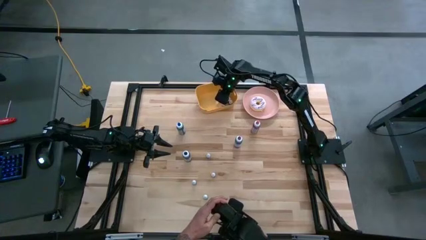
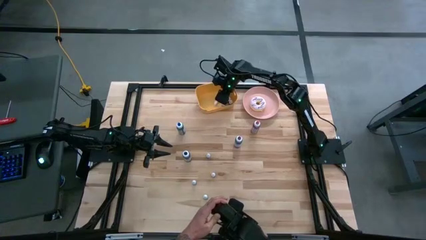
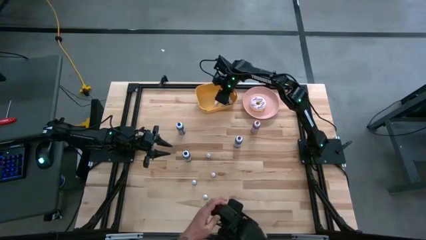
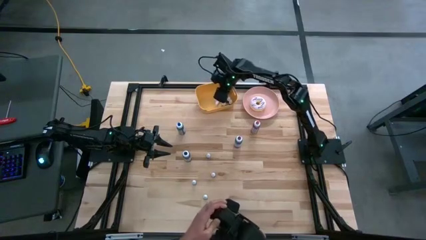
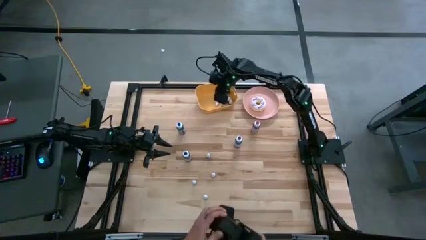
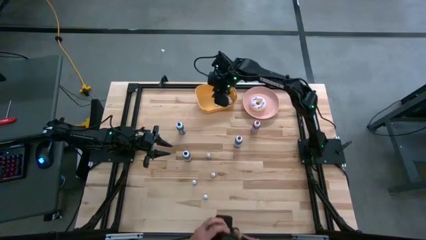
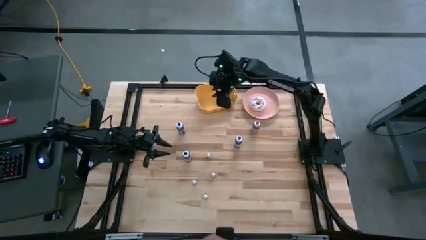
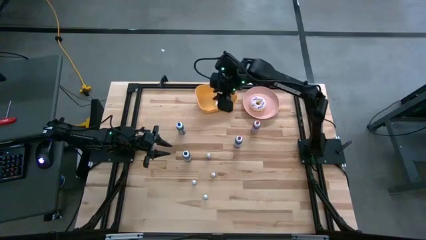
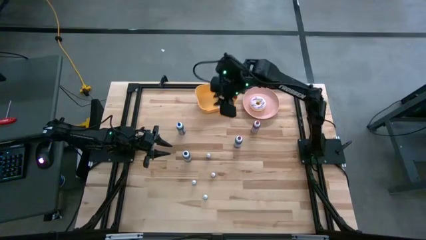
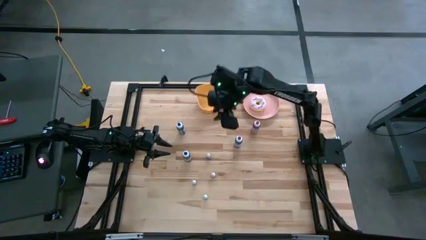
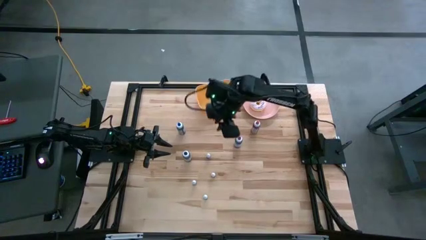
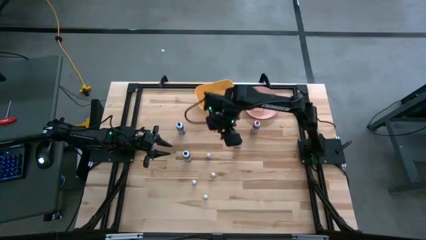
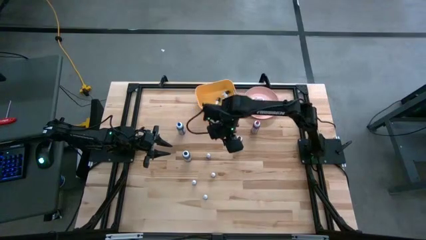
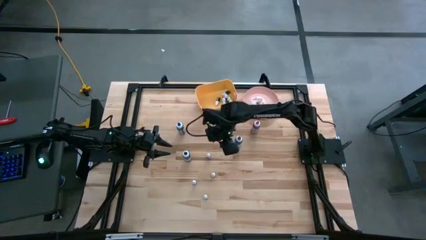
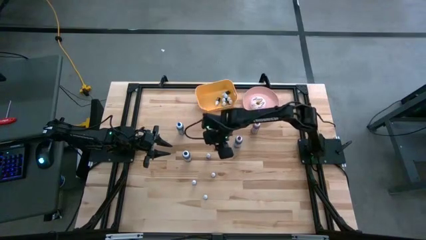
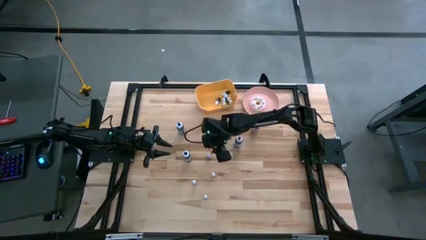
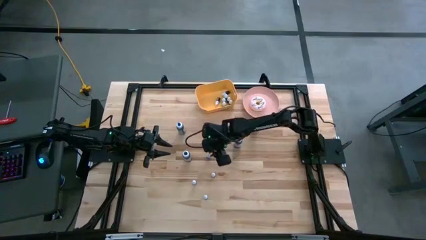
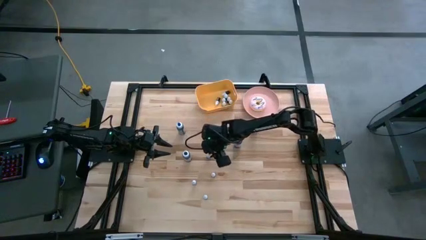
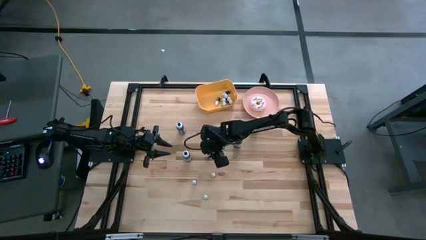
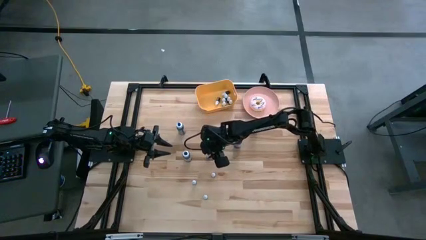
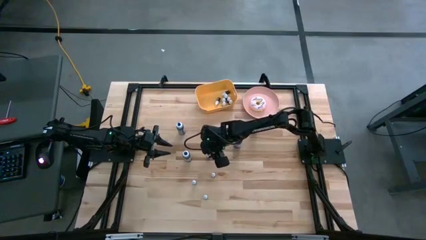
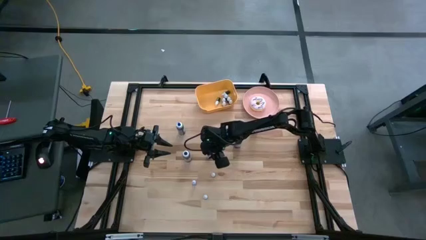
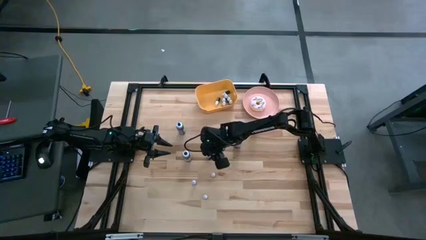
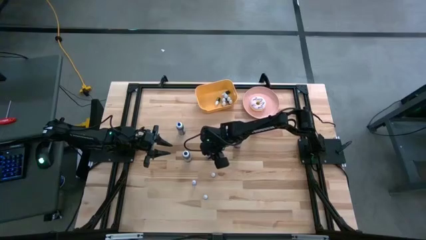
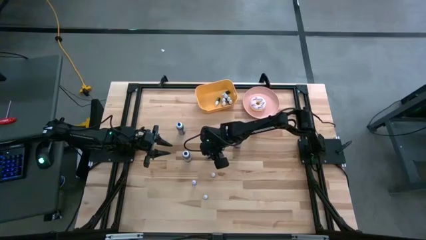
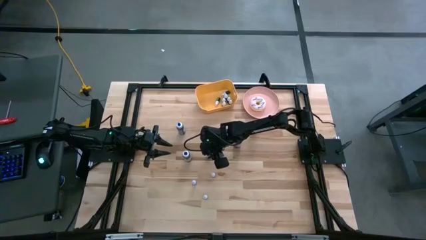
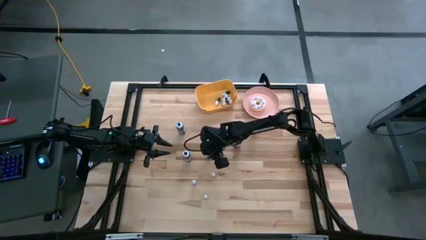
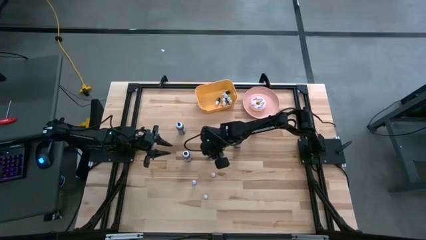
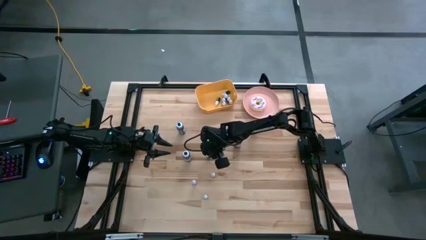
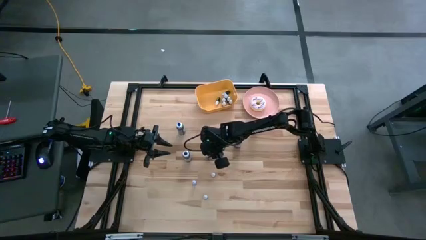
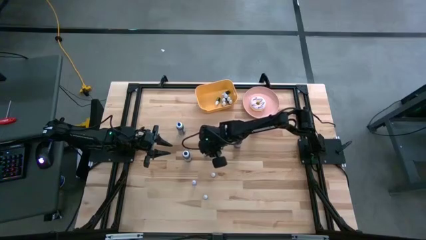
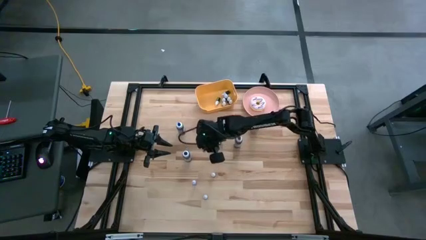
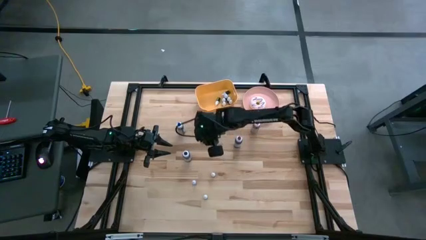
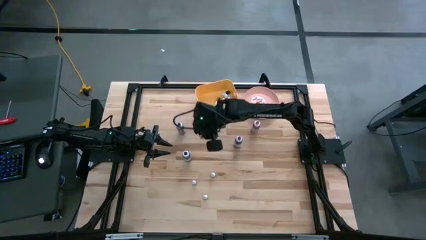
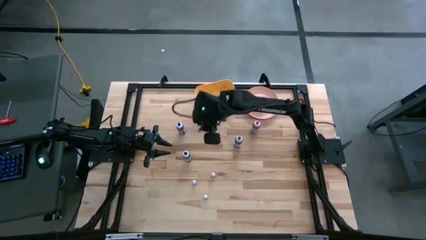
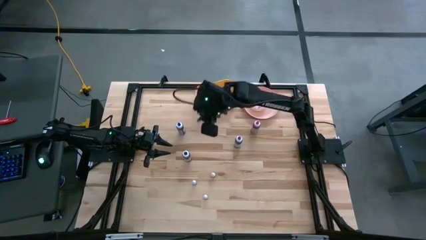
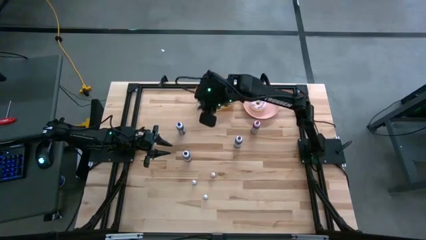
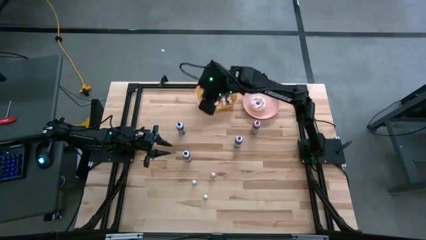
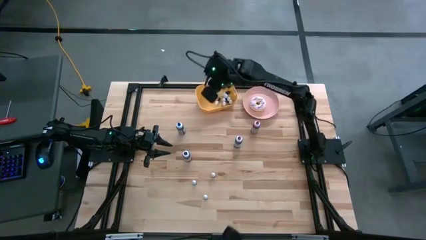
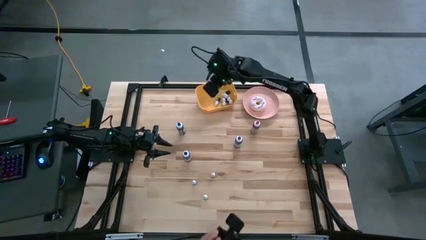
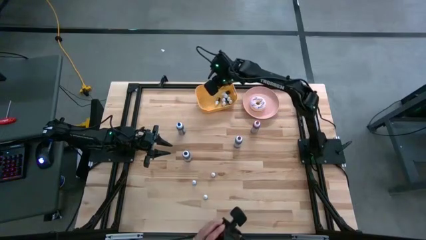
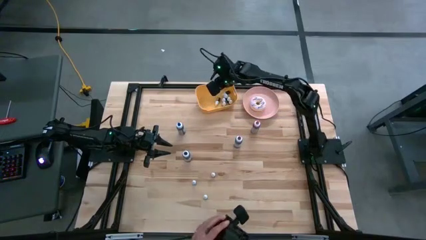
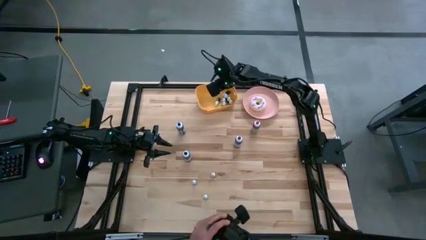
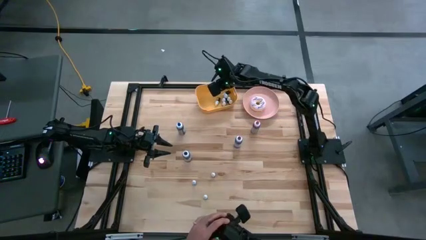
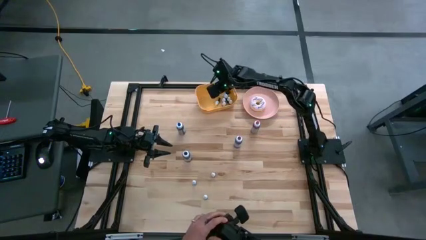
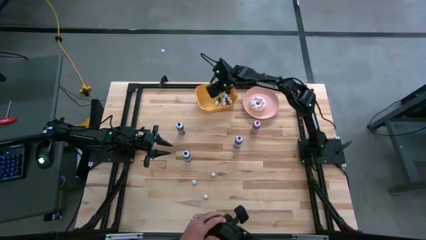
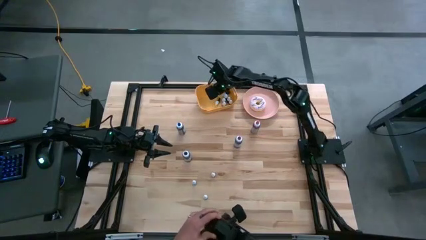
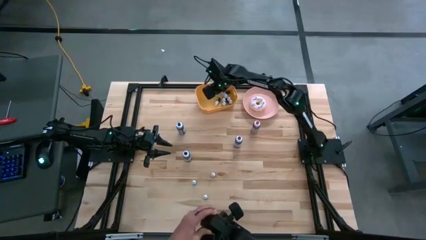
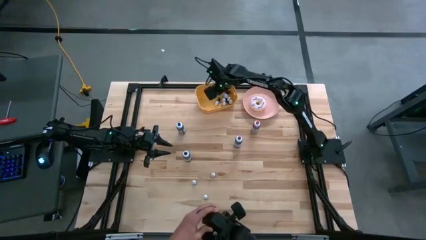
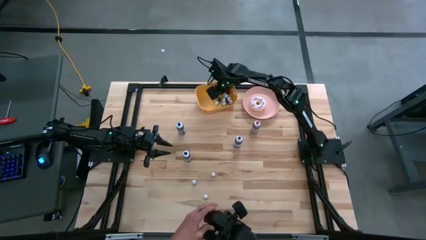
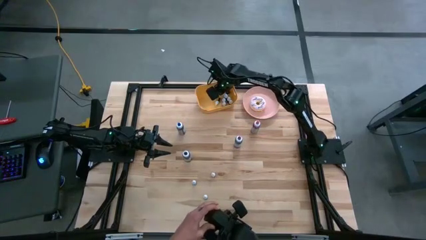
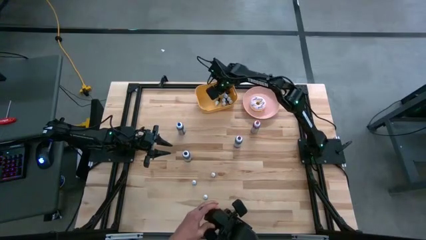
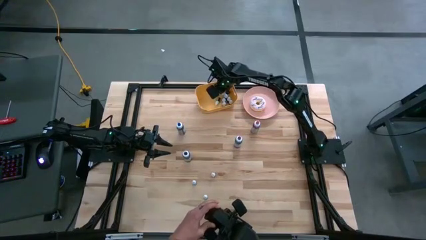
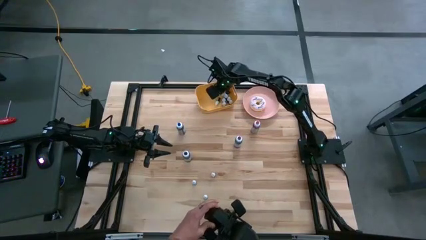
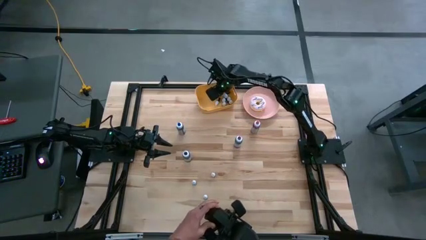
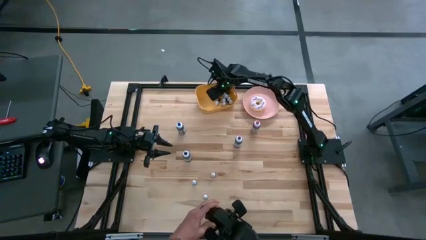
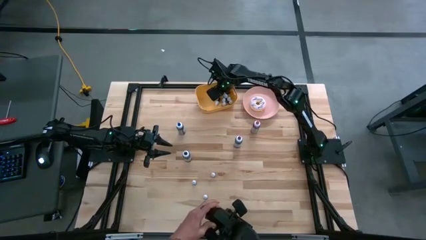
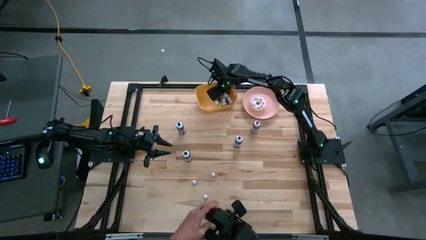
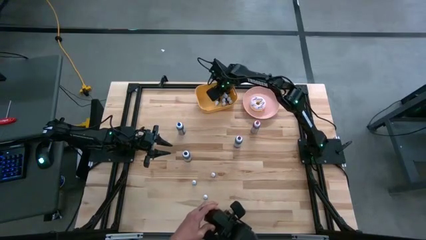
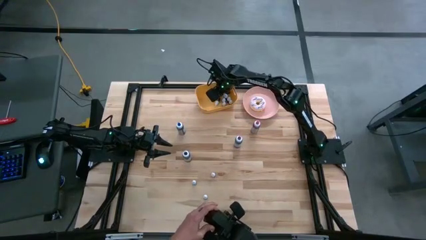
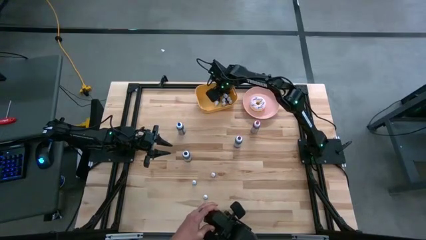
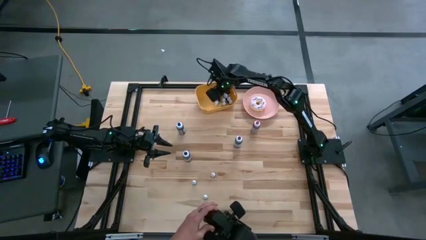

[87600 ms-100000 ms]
Task: Pick & Place food coloring
Put the small blue food coloring bottle into the yellow bin

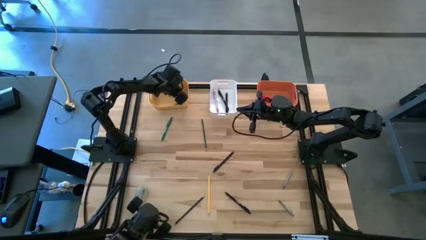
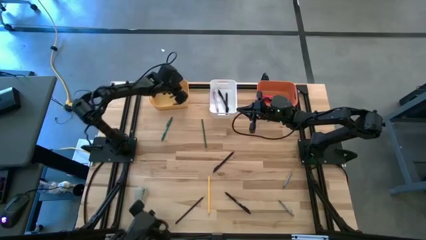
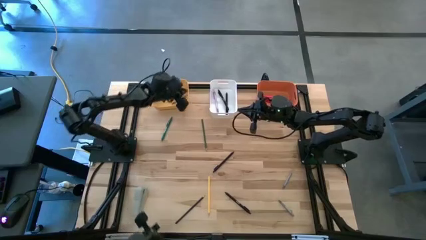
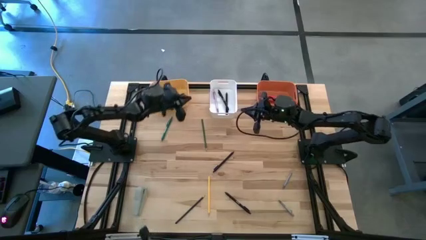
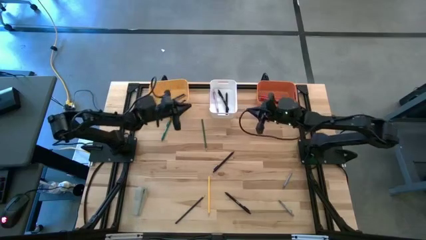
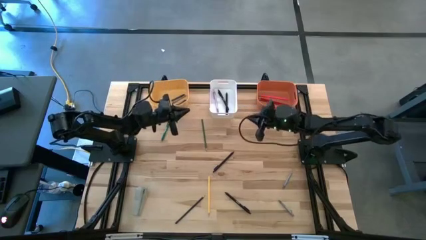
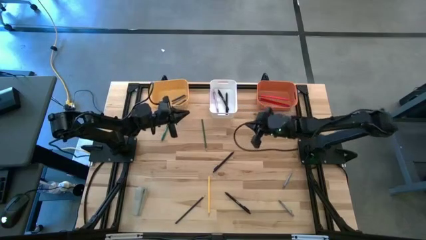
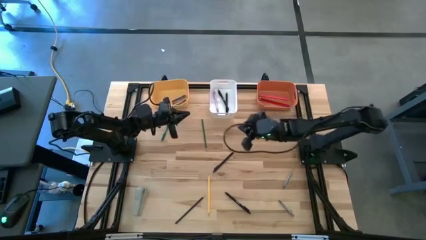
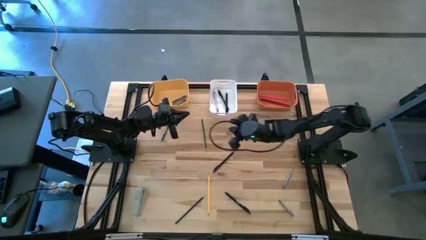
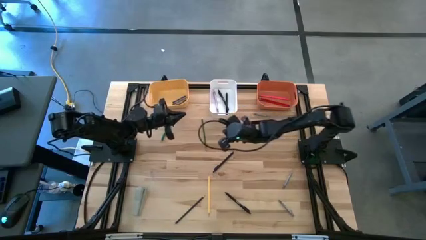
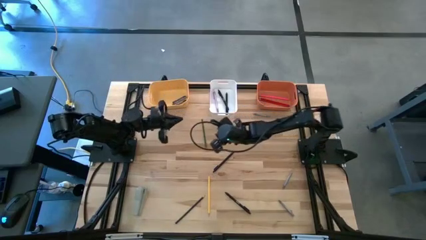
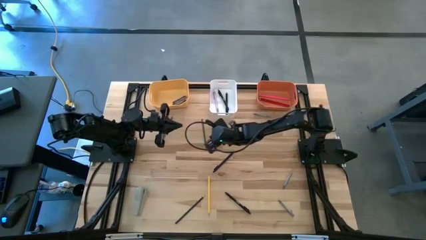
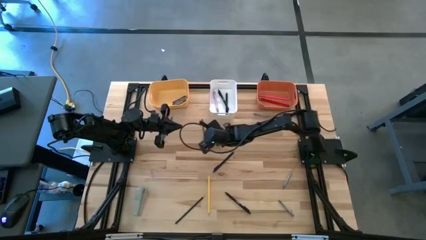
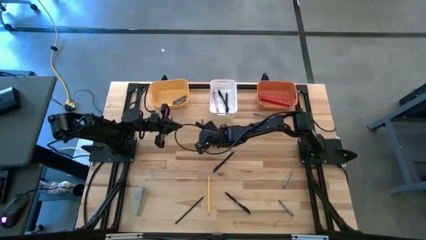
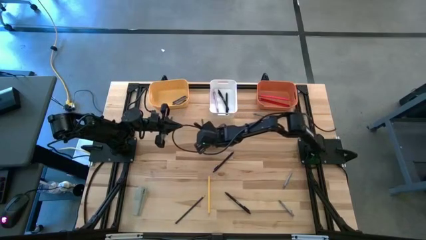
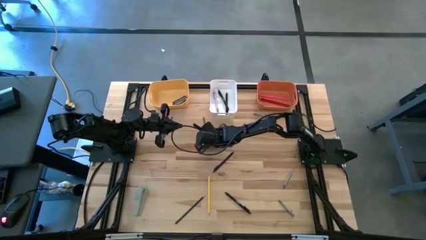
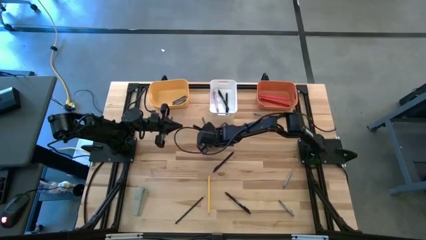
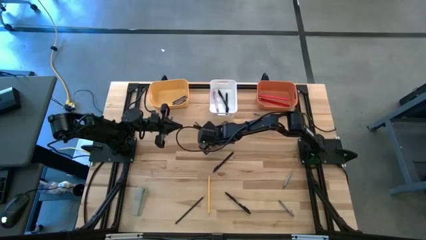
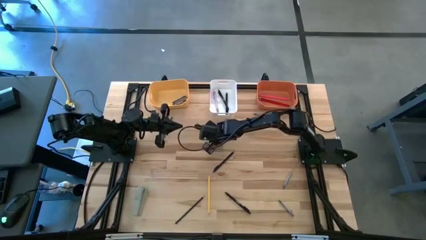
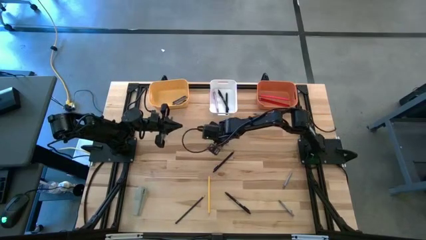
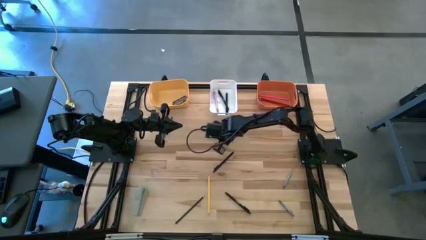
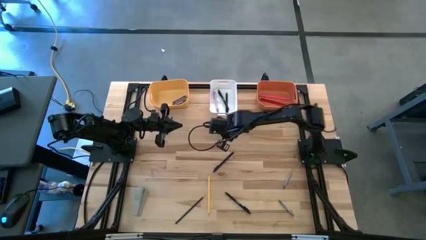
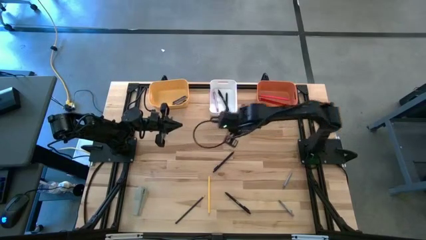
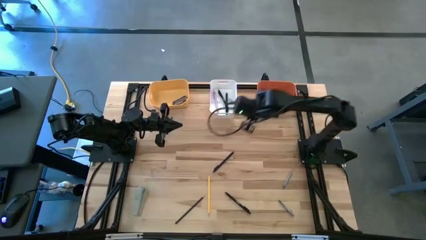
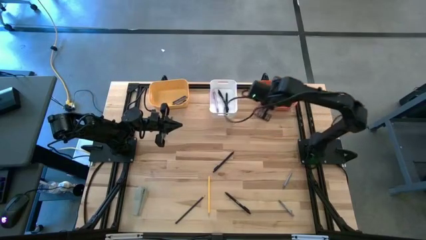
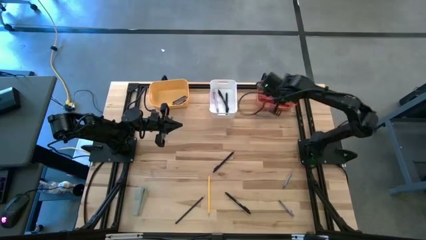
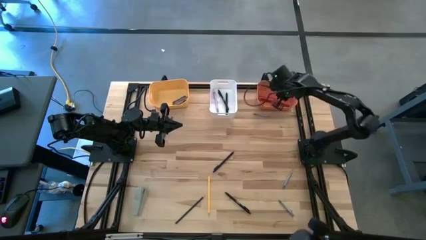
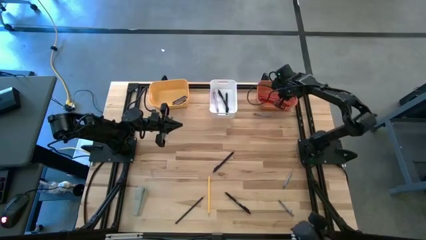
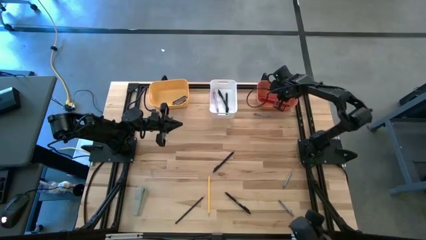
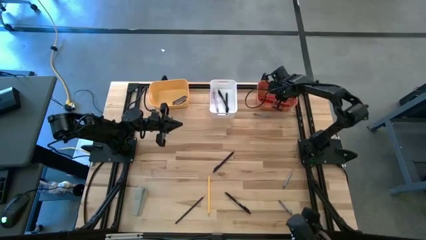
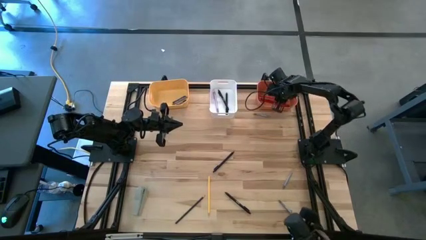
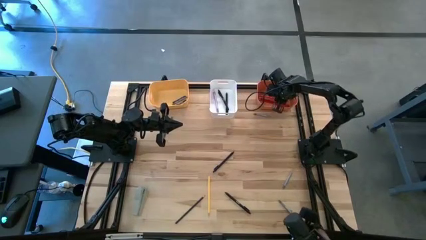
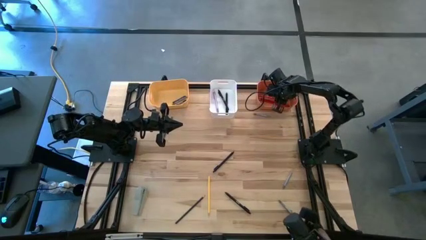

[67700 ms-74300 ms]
Task: Sort crayons/erasers/pens/pencils in bins
Put the green pencil into the orange bin
